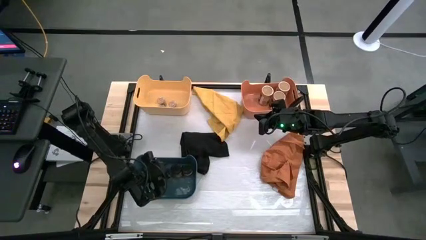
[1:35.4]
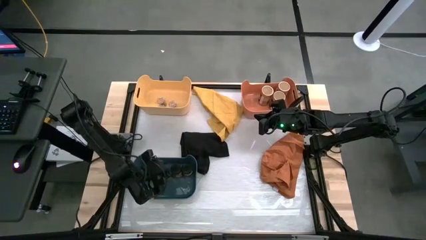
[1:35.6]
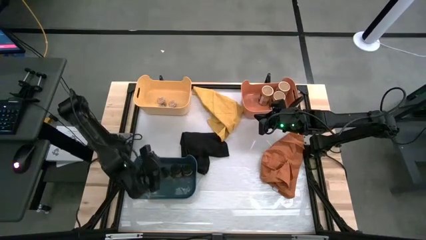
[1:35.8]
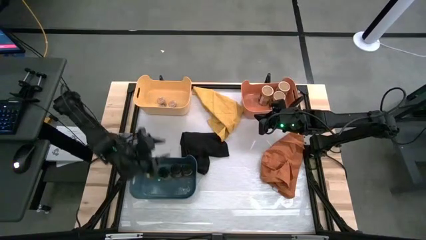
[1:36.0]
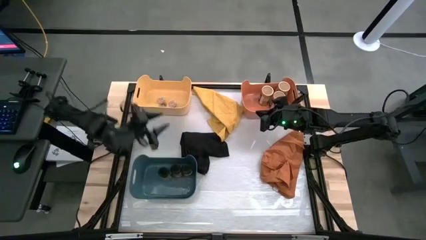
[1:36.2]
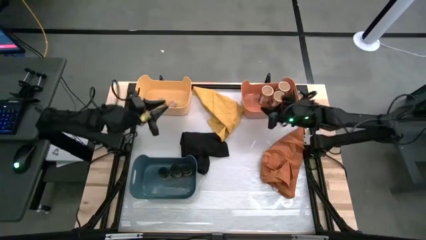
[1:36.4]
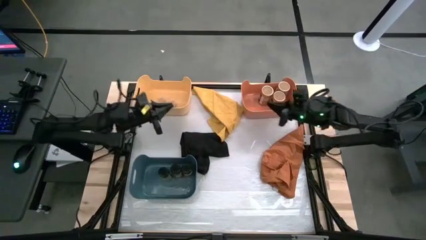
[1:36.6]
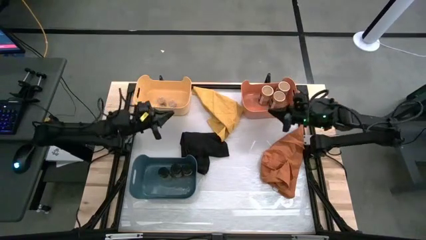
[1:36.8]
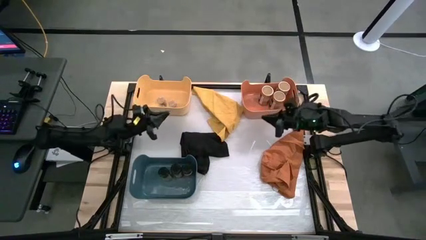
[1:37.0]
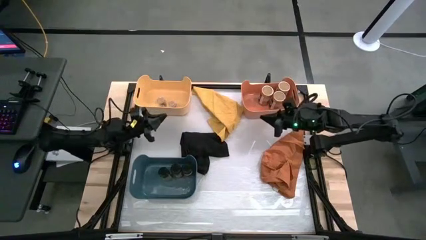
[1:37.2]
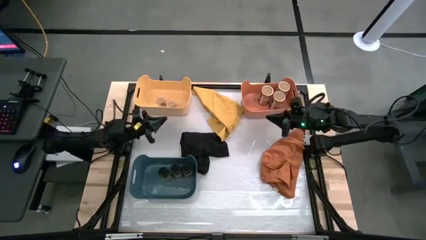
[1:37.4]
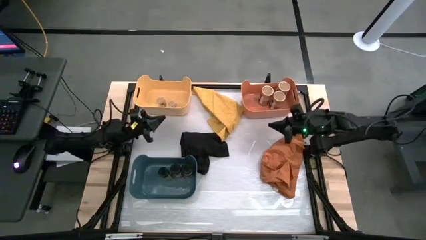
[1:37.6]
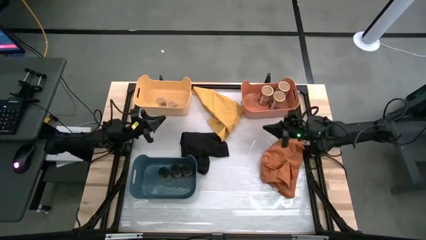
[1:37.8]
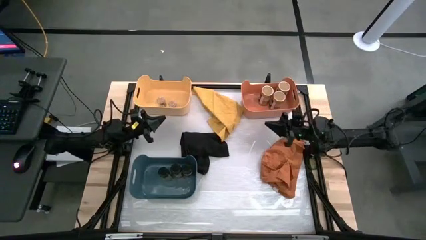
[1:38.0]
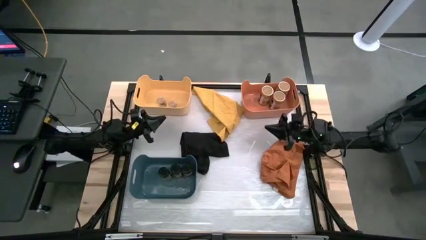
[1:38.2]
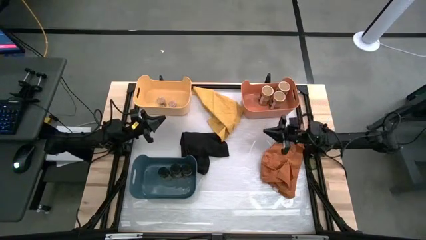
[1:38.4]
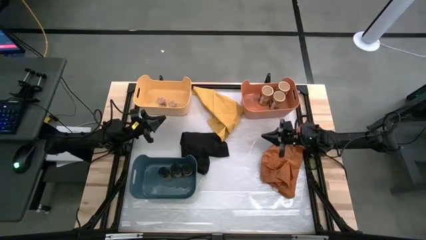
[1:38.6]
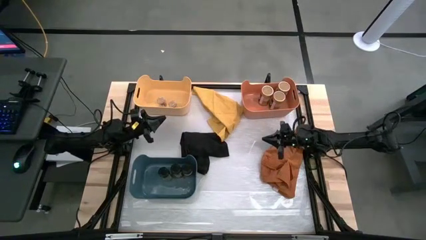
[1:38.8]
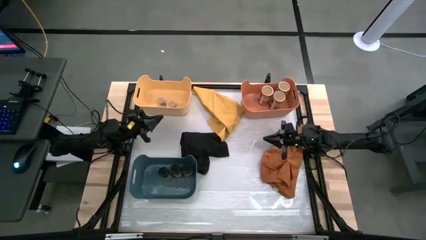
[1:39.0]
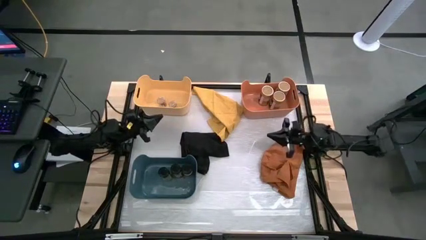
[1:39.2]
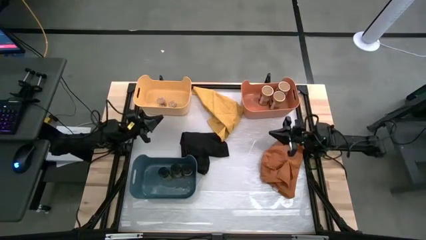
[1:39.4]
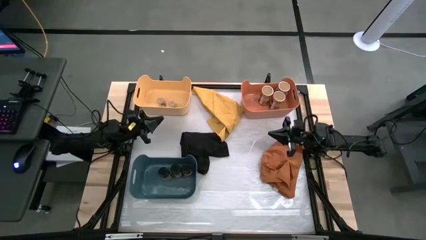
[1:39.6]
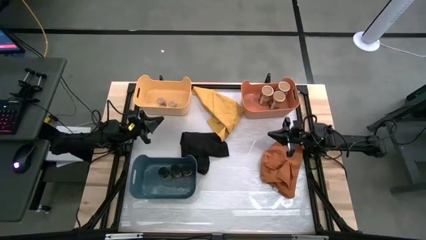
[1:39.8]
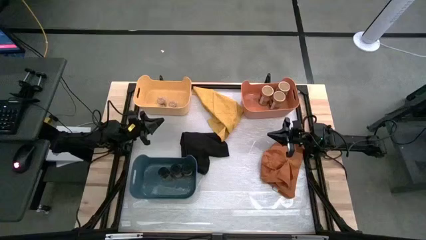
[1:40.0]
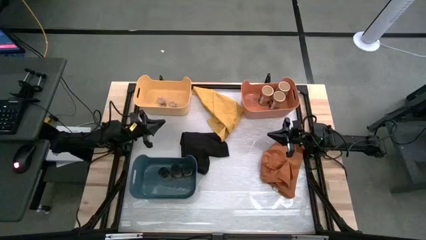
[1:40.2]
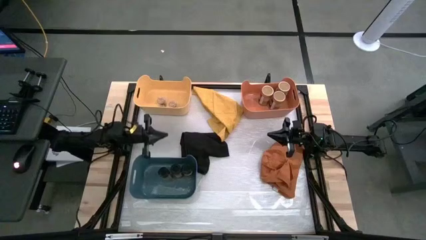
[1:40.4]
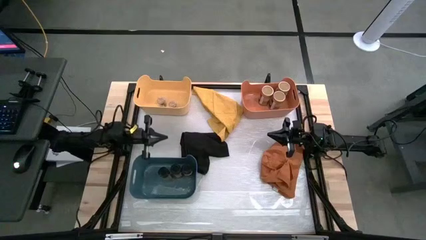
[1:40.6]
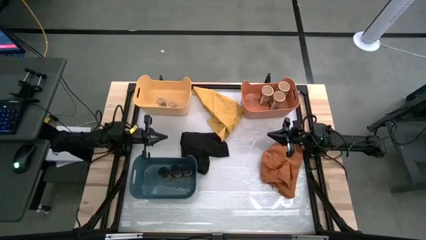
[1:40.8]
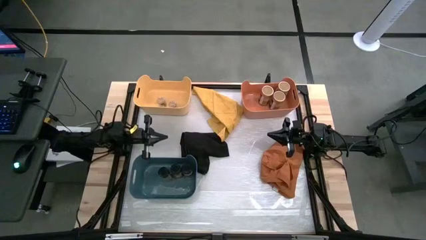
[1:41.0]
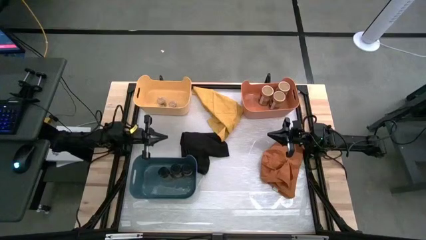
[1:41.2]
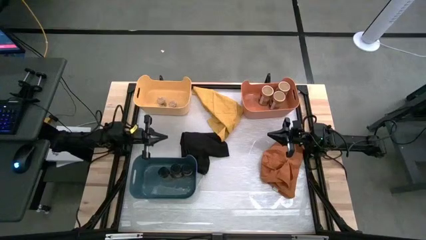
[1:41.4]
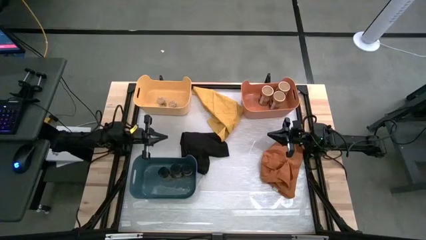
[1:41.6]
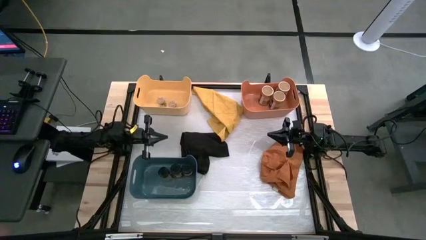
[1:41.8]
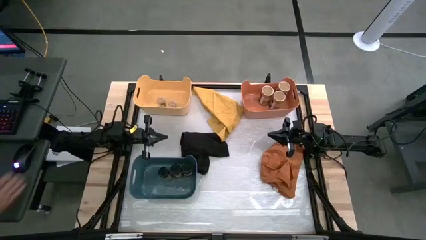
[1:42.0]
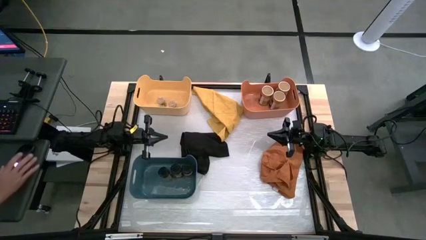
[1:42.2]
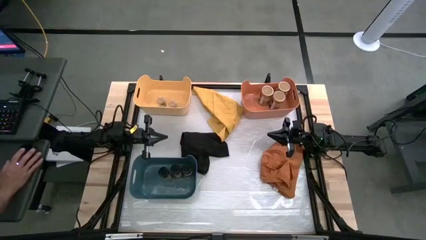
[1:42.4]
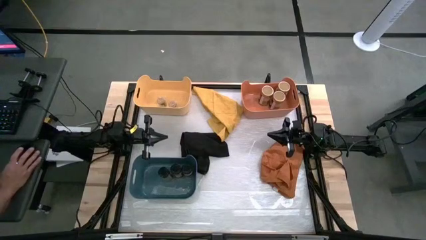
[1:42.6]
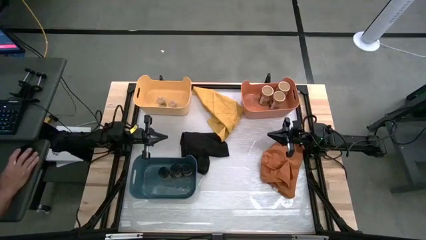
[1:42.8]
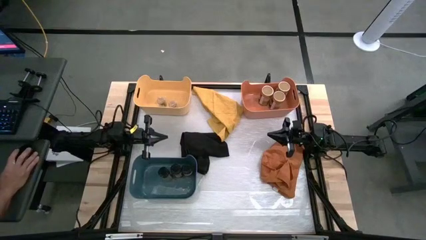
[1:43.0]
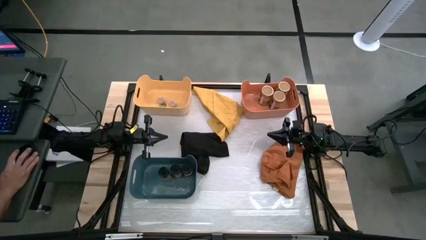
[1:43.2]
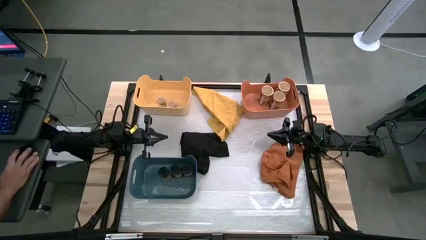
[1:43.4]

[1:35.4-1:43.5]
Task: Sort spices by type
Return to Home Position
